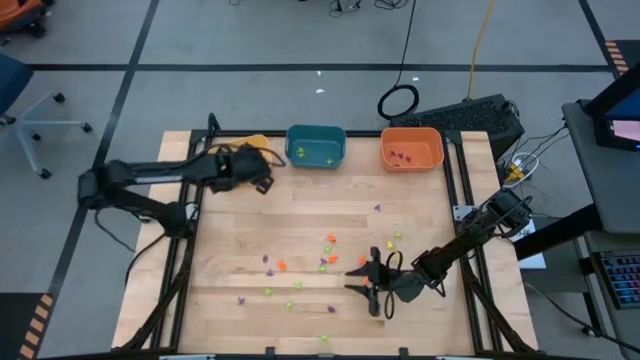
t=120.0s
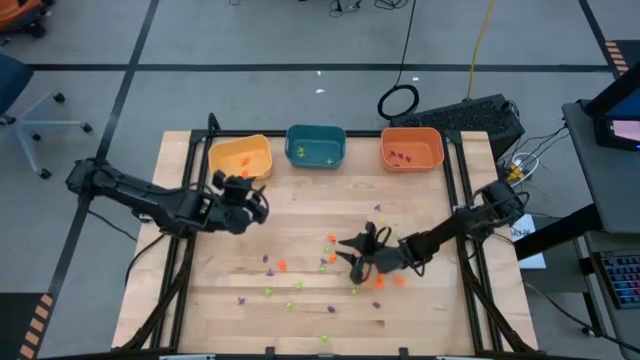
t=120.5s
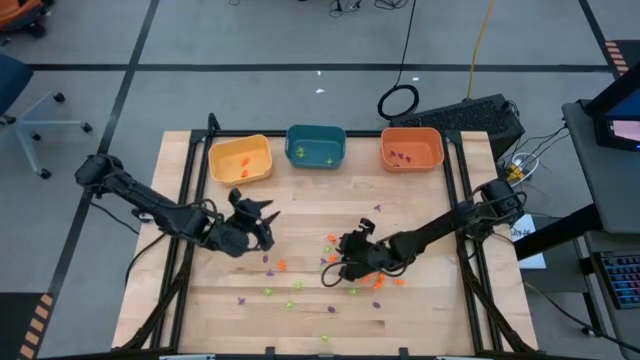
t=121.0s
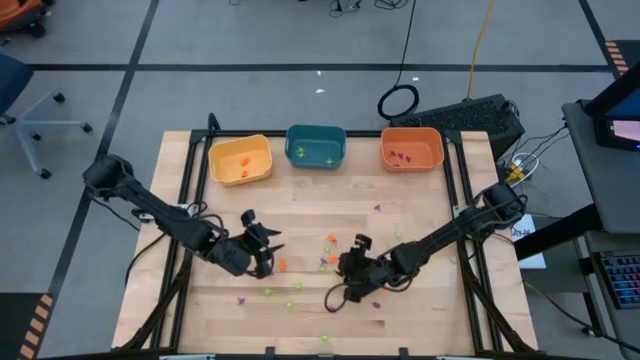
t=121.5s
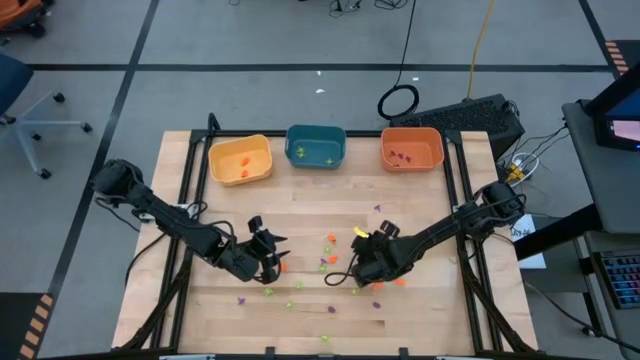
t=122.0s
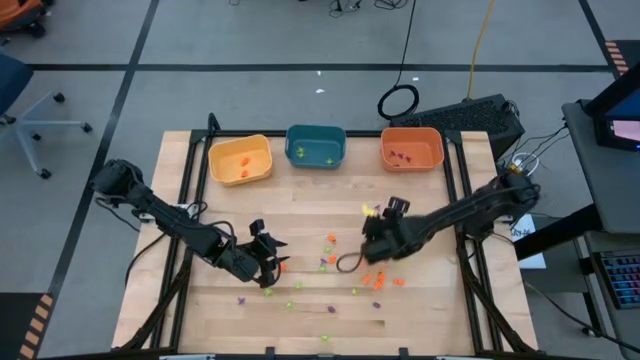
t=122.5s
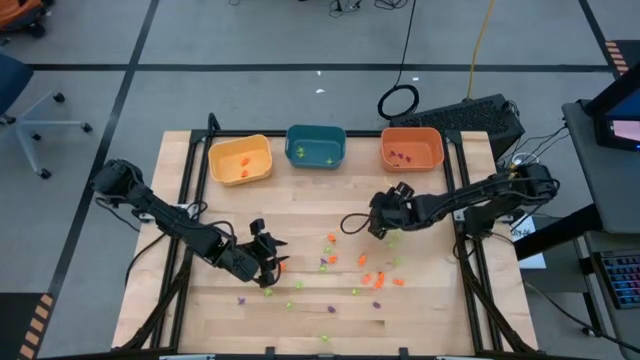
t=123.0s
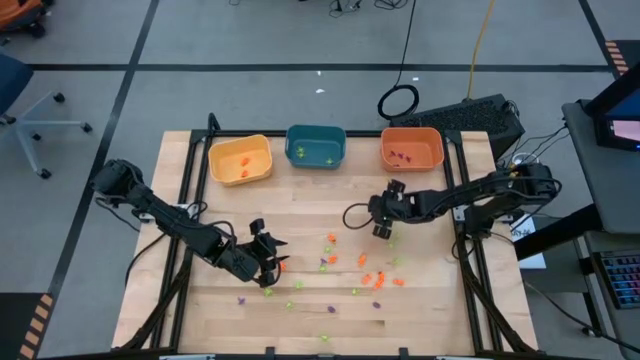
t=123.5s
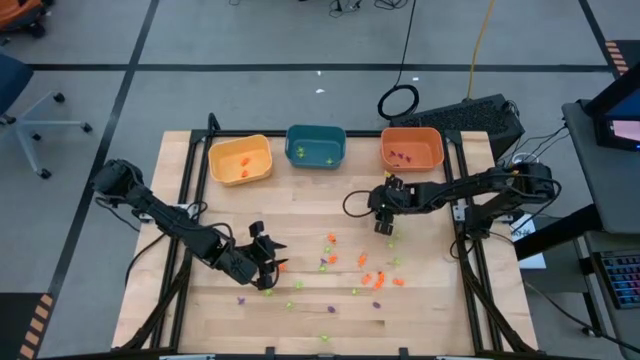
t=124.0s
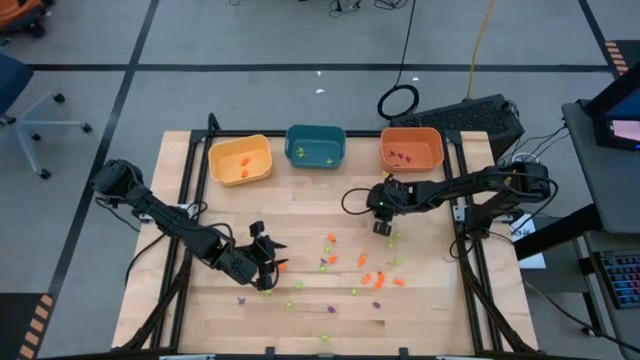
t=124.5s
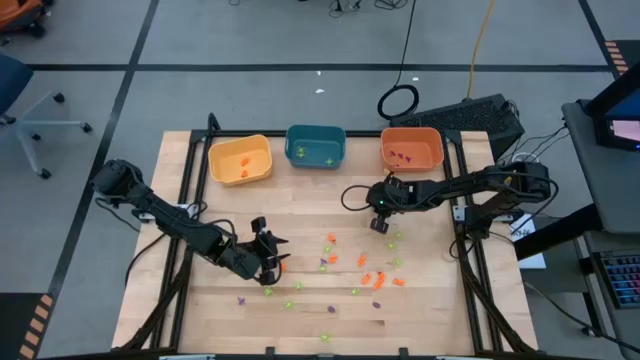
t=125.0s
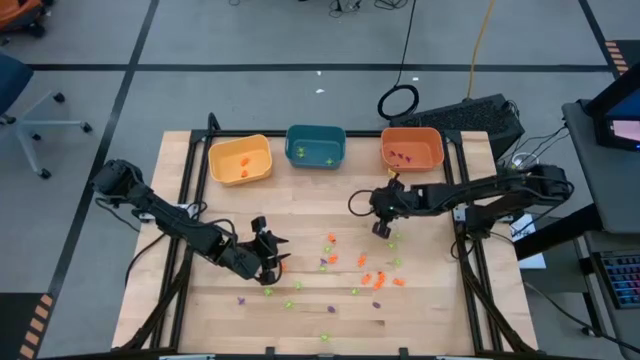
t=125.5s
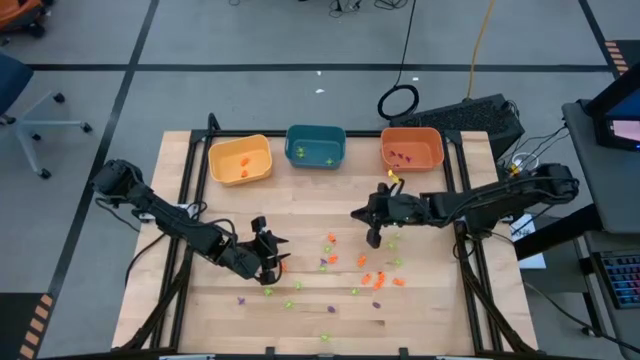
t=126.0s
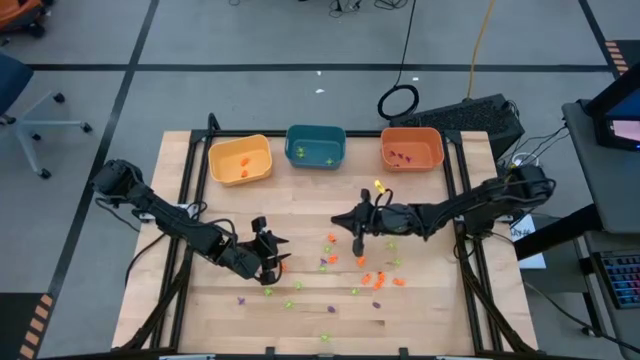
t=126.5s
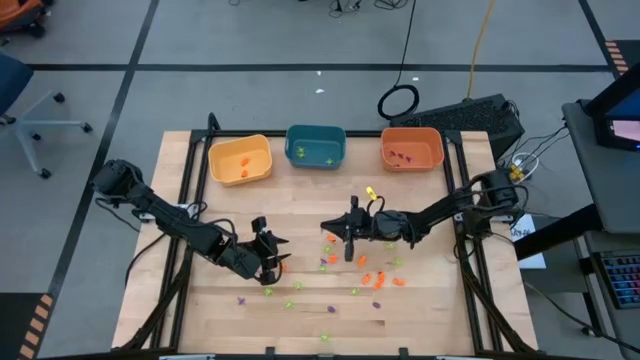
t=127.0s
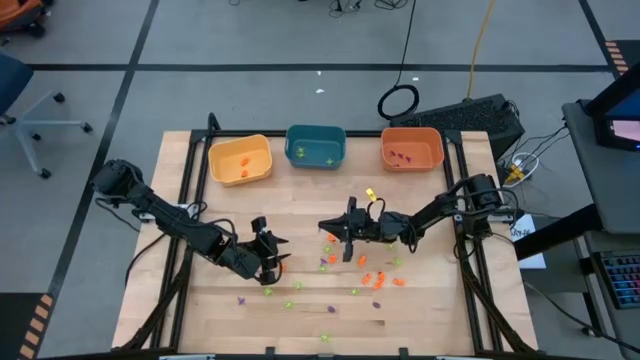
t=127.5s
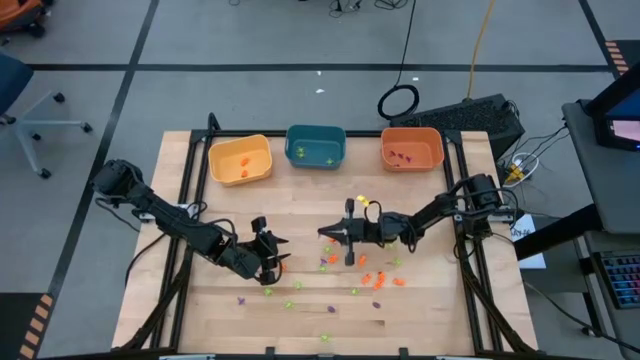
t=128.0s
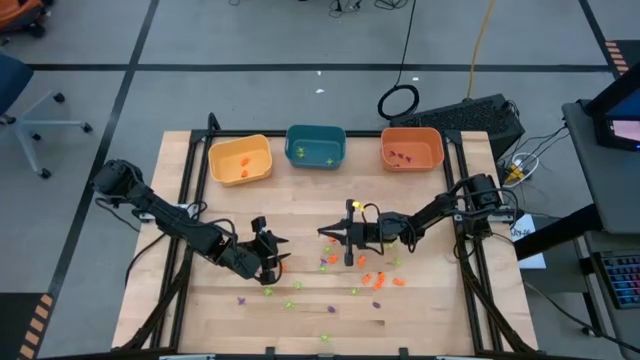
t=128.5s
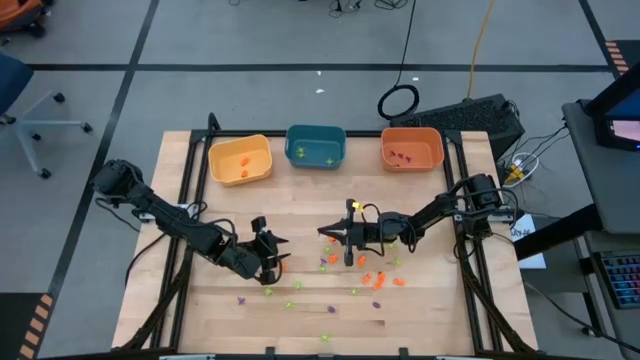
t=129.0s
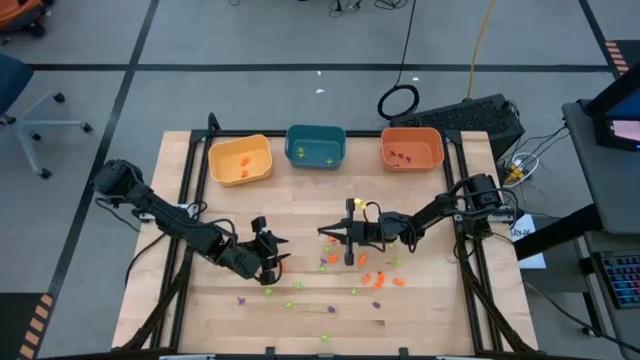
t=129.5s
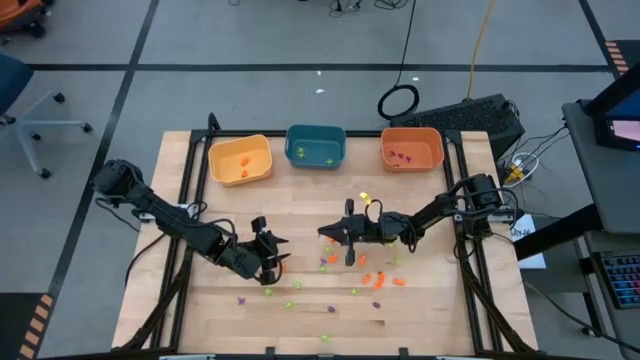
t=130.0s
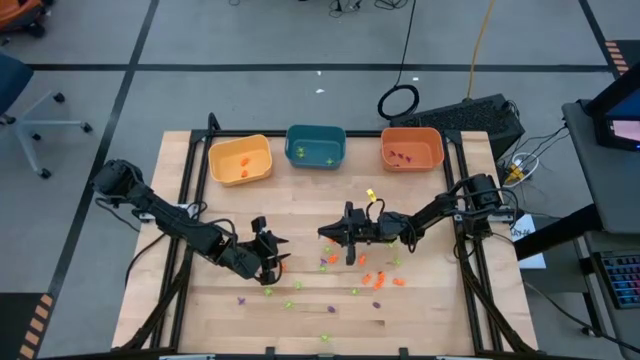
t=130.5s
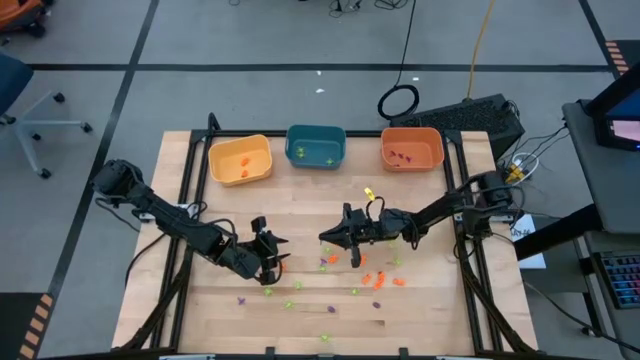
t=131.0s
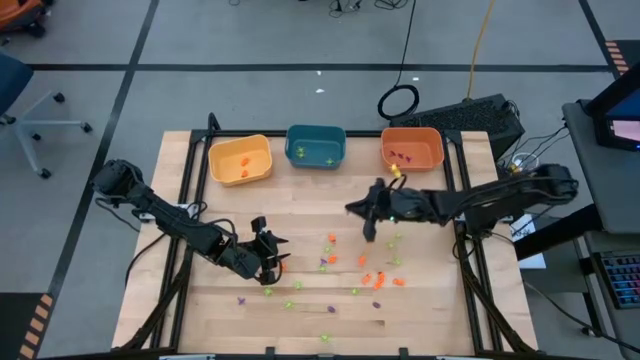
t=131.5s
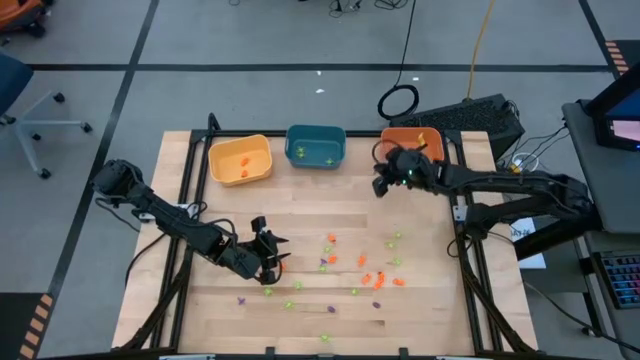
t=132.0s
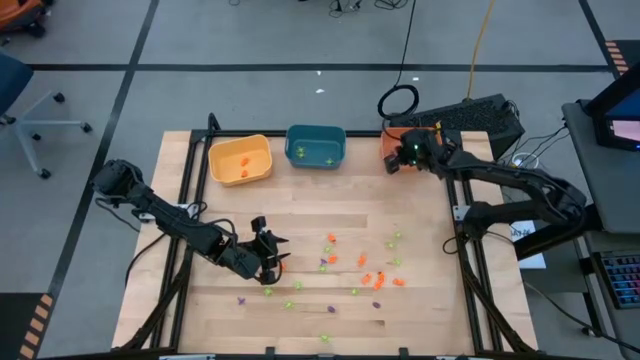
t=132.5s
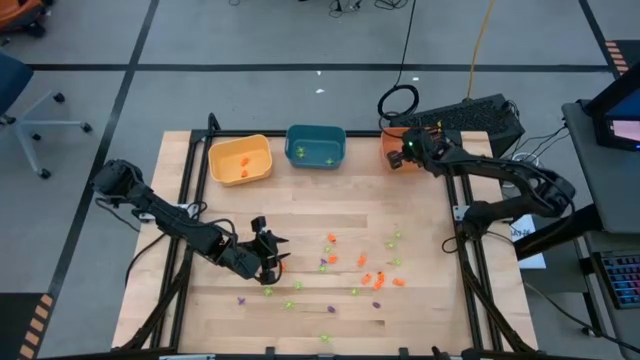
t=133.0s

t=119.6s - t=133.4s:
Task: Sort Halloween decoration
Put the violet witch hat toy into the orange bin

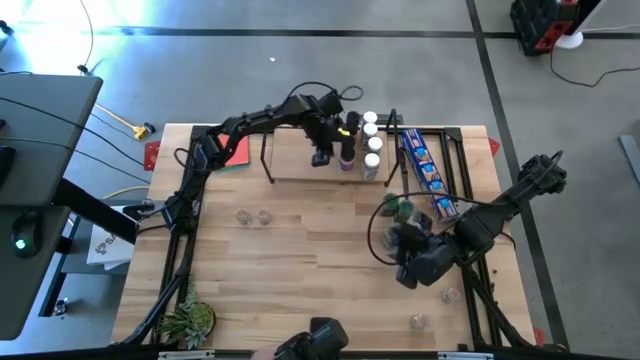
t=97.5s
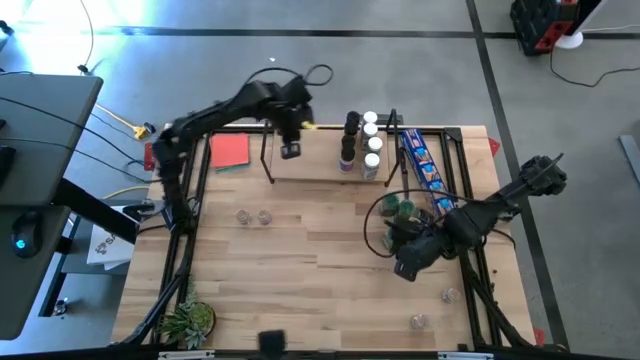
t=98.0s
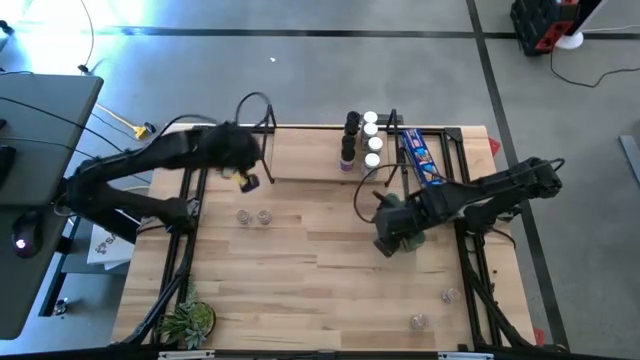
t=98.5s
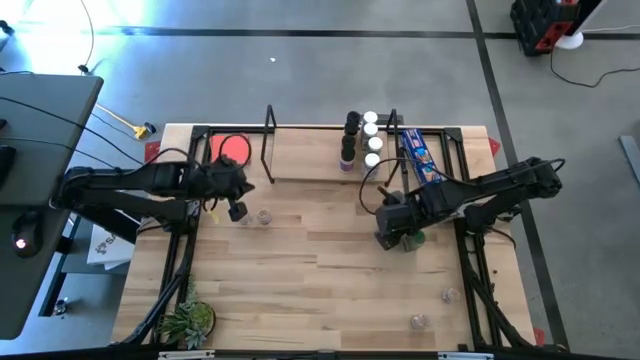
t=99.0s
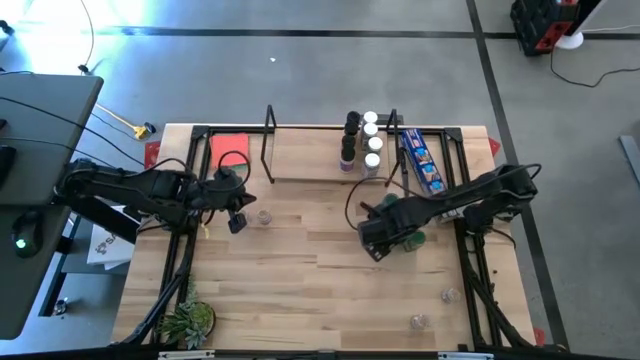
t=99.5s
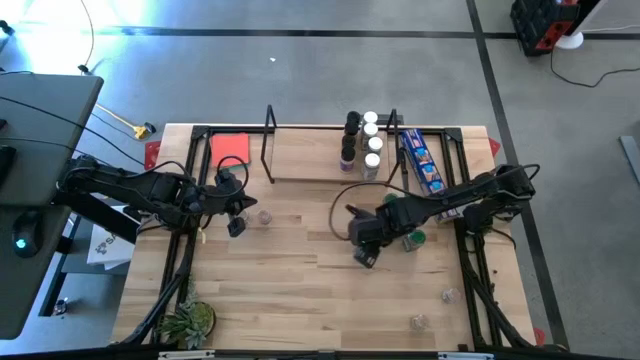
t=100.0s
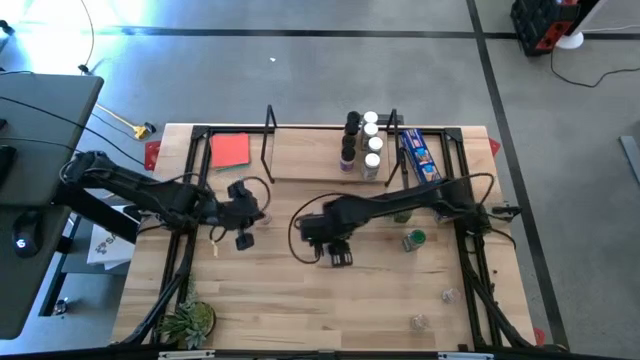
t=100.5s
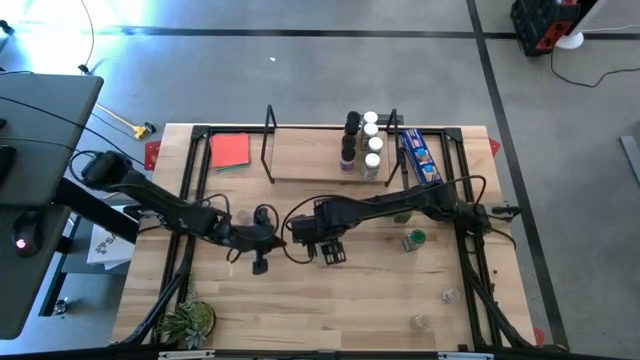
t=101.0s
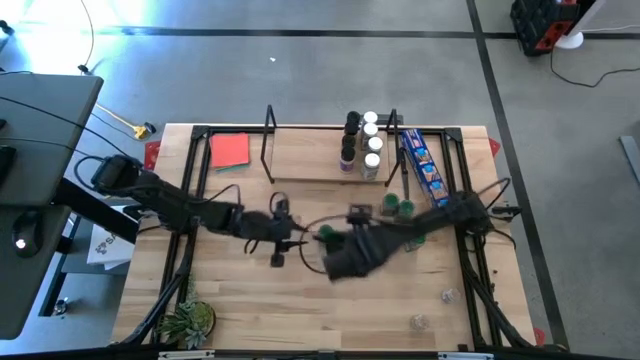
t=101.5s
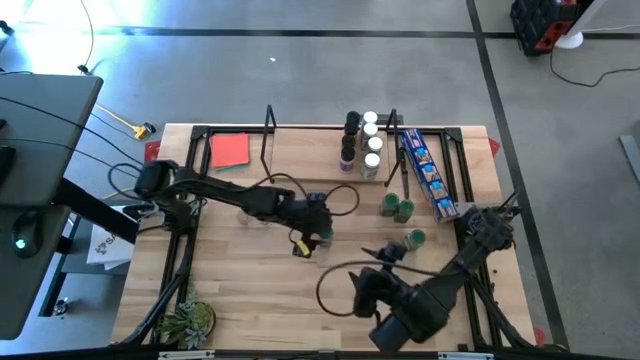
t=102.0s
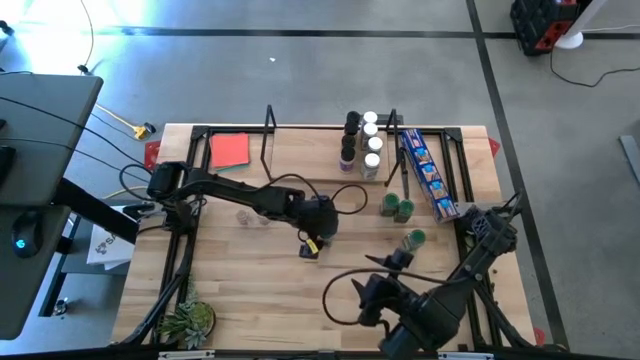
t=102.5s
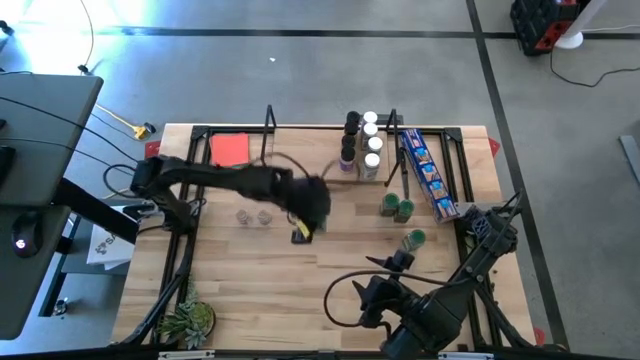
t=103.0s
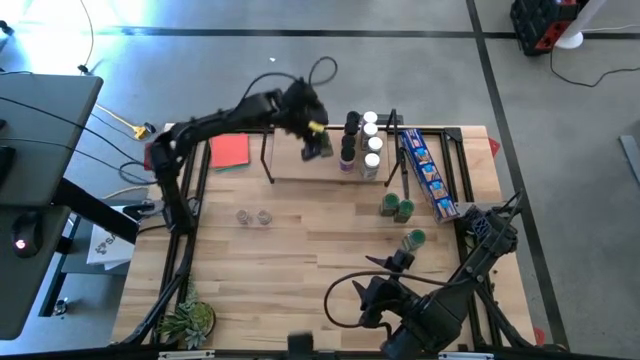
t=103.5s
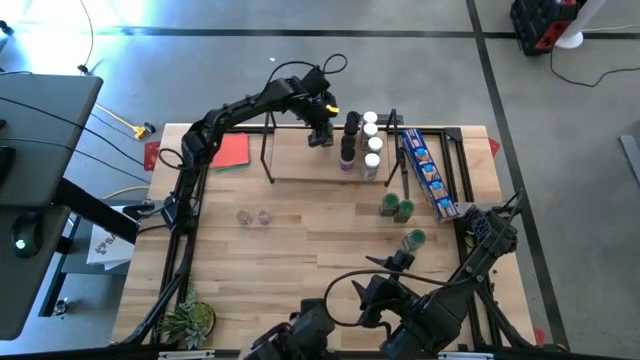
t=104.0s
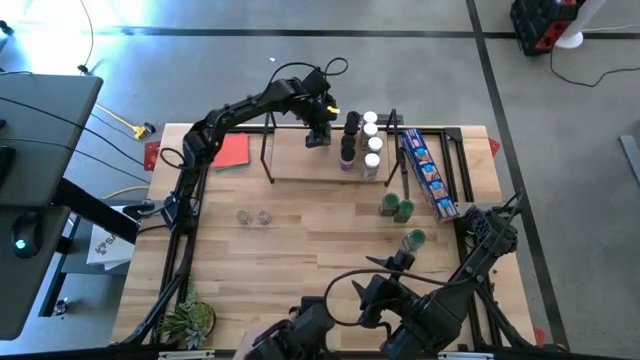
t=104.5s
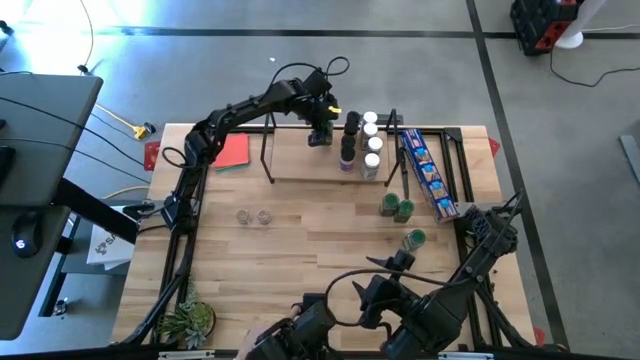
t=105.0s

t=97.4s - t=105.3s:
Task: Shelf spices
Put the left green seasoning bottle on the shelf
